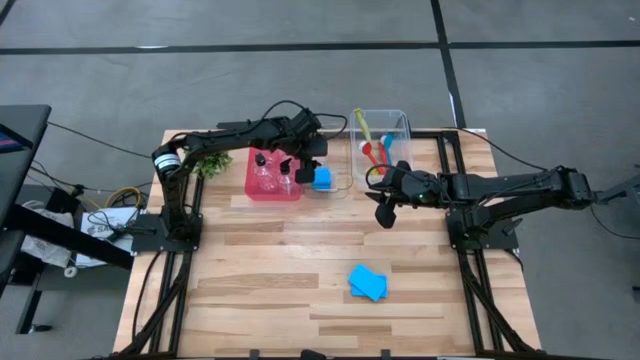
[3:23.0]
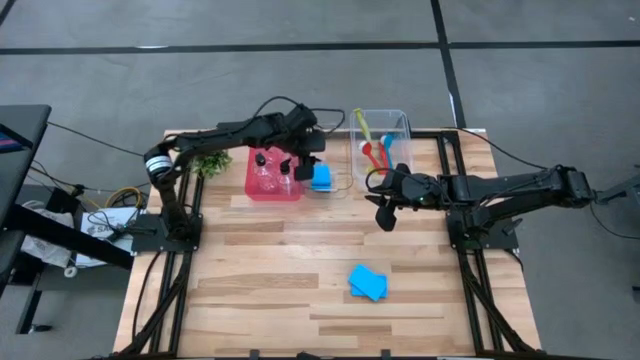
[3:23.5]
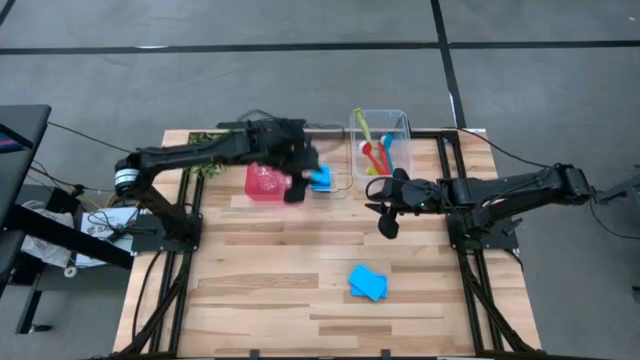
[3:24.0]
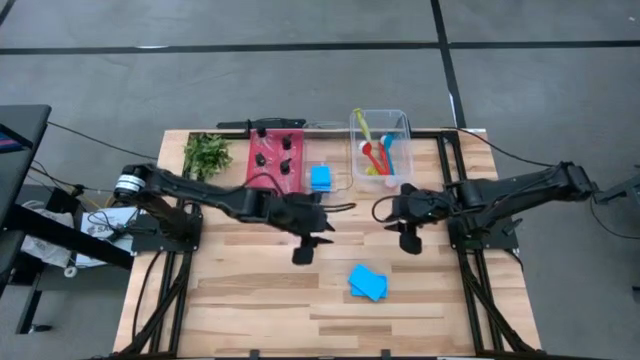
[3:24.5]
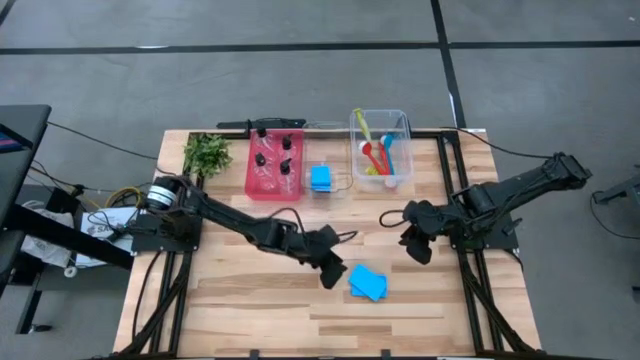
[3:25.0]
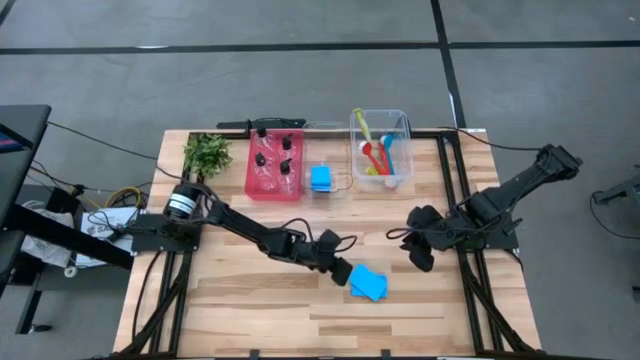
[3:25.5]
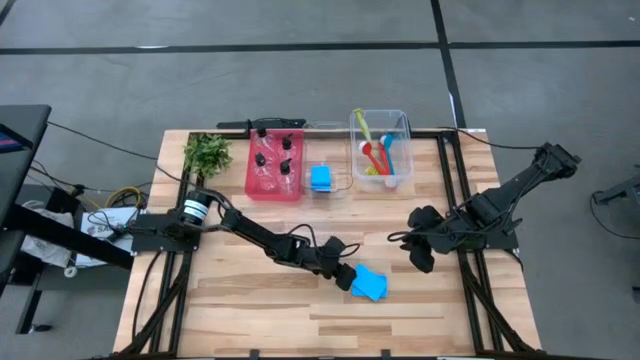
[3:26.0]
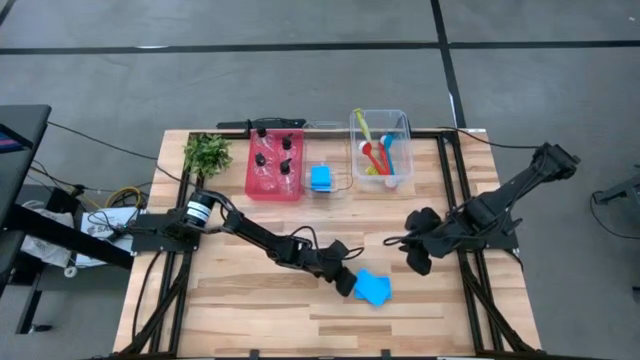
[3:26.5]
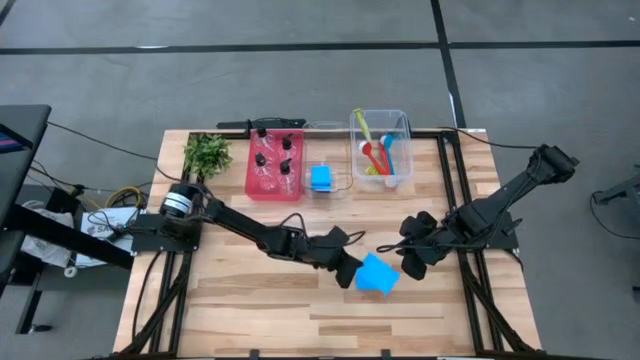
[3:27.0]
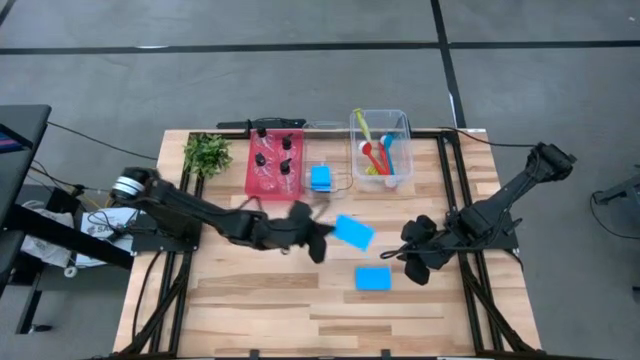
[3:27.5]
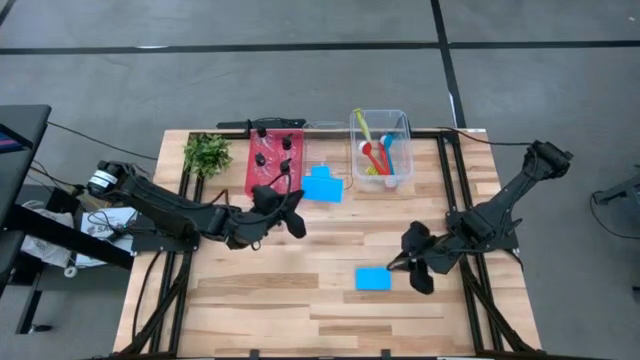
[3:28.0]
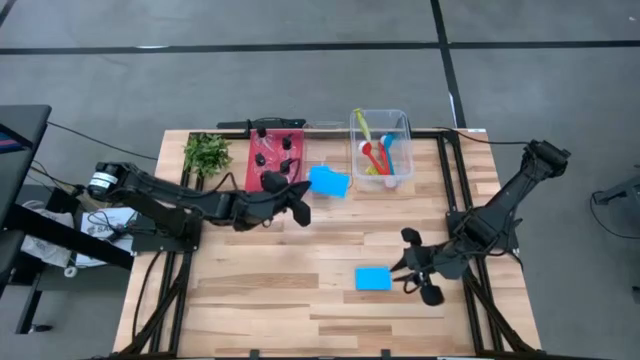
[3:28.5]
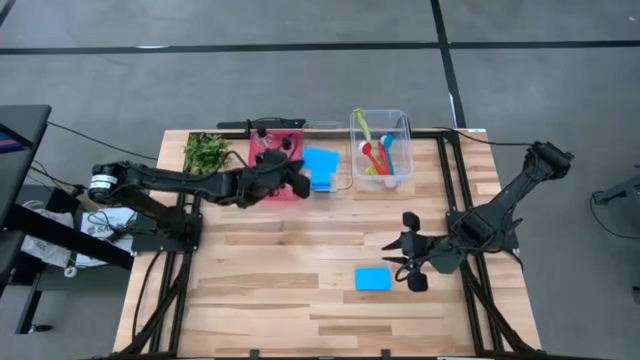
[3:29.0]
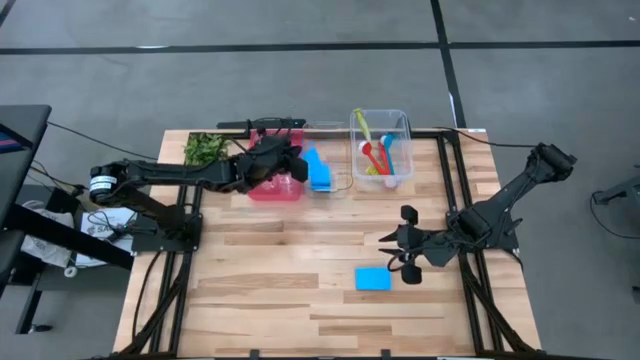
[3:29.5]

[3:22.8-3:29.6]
Task: Pick & Place Kitchen Sink Supplies
Put the blue sponge into the transparent bin

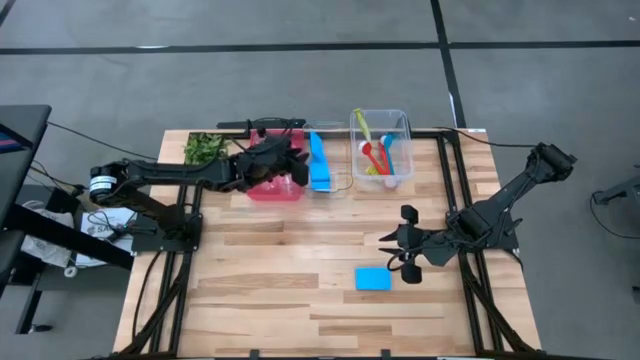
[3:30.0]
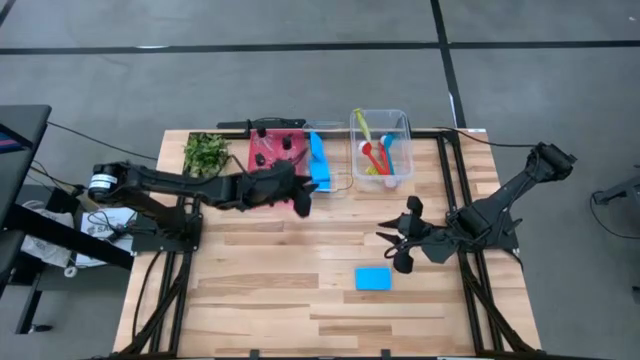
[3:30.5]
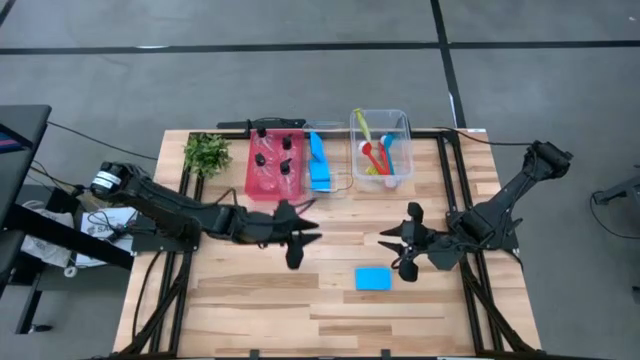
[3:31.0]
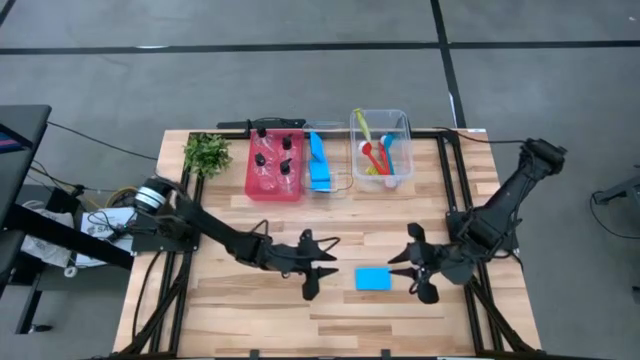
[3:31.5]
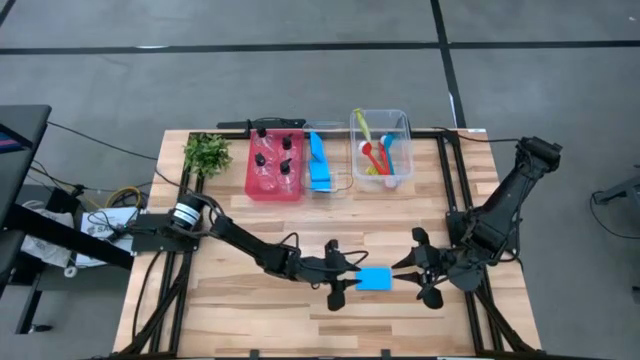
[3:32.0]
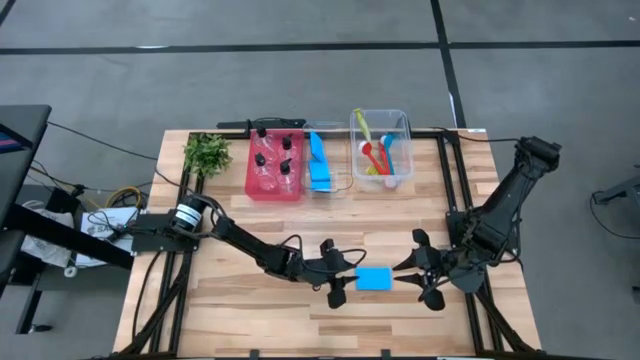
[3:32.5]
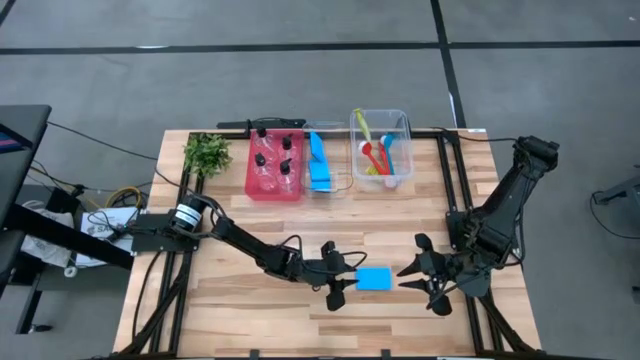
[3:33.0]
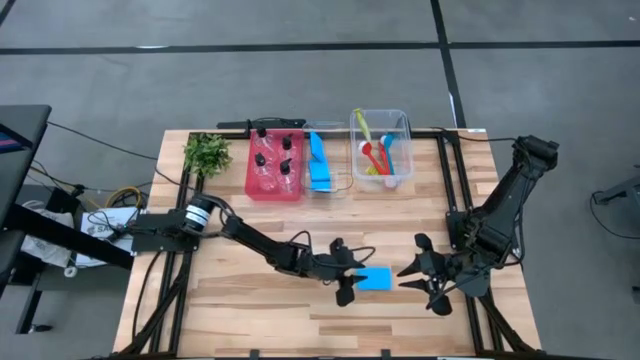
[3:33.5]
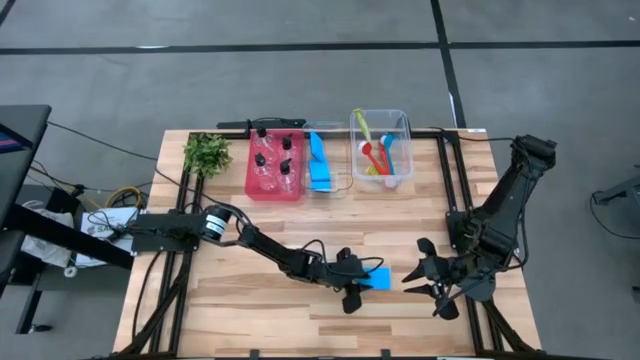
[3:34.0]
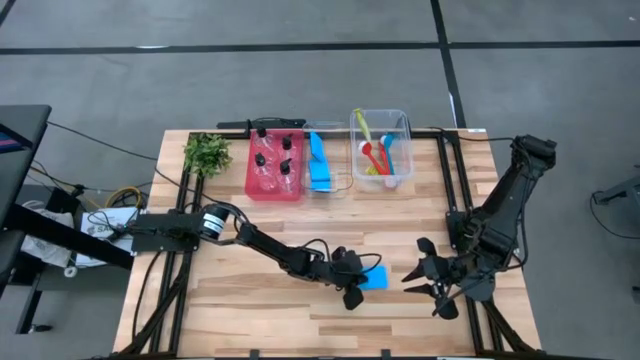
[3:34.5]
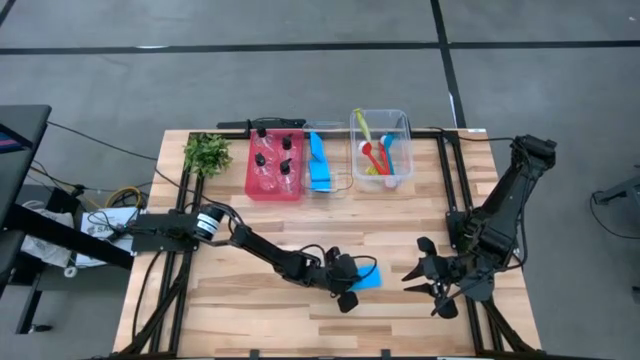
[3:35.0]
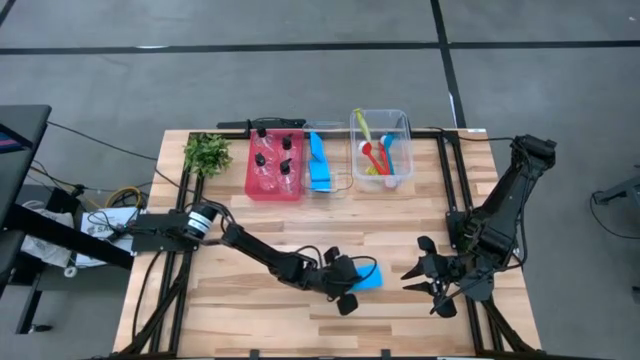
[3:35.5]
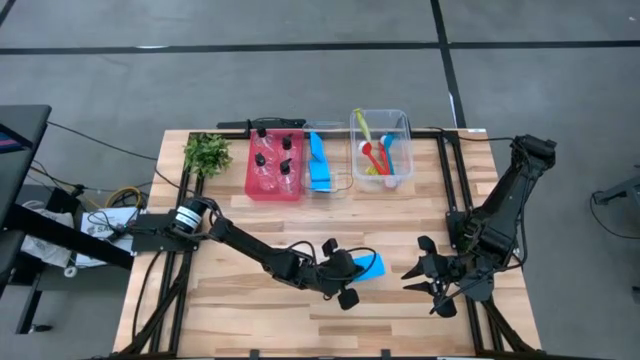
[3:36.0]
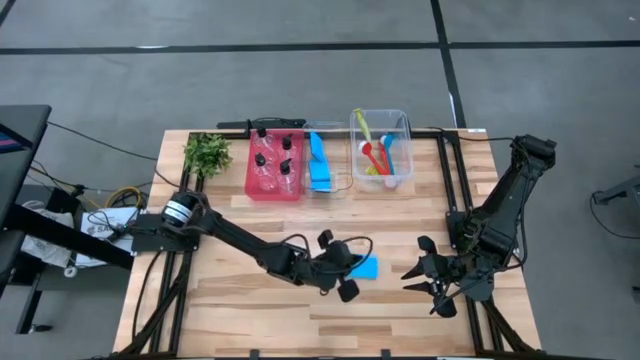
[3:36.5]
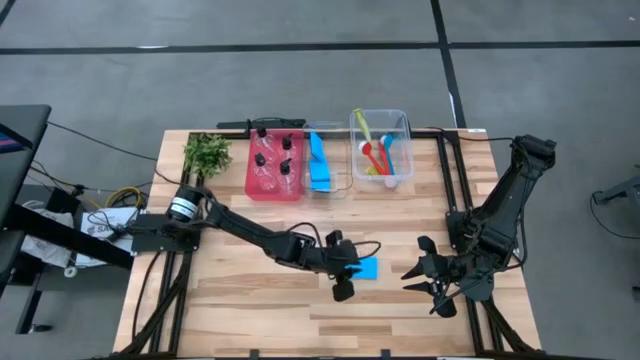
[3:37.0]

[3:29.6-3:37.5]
Put the blue sponge into the transparent bin

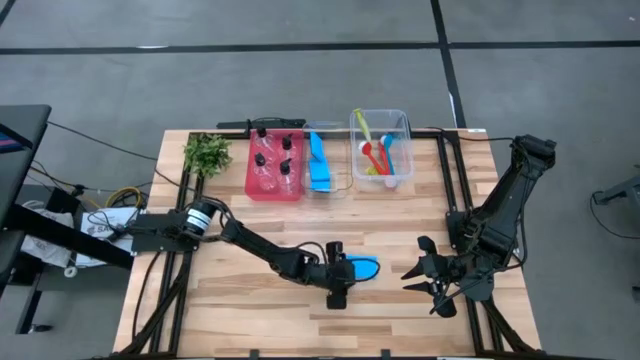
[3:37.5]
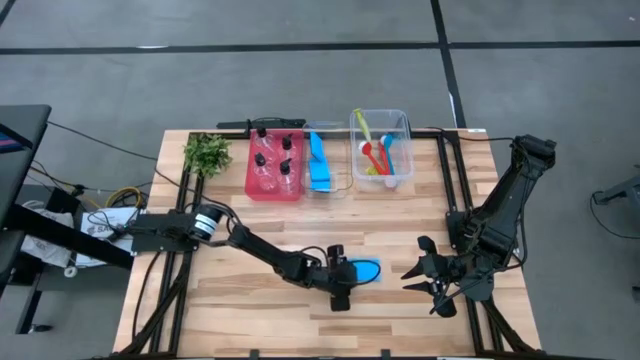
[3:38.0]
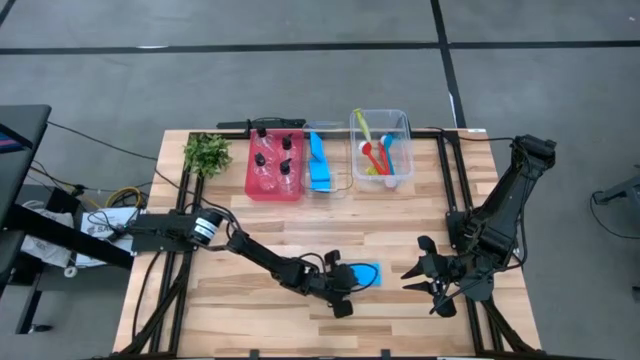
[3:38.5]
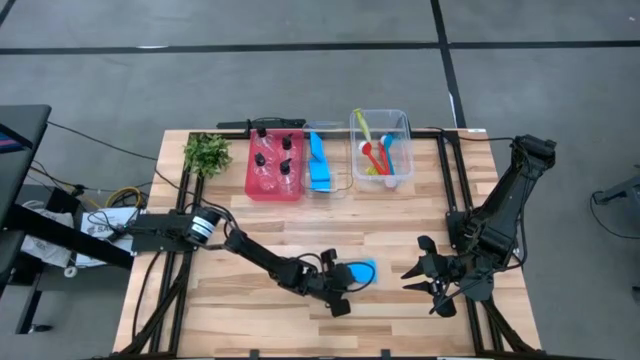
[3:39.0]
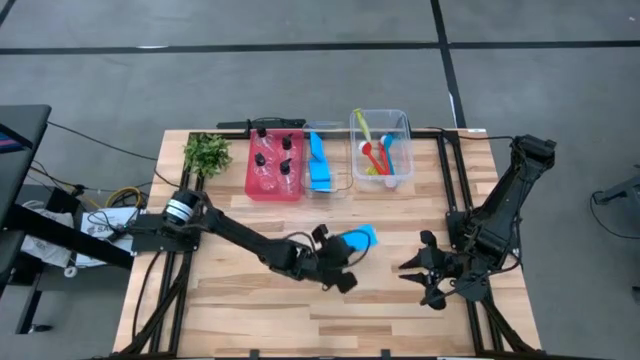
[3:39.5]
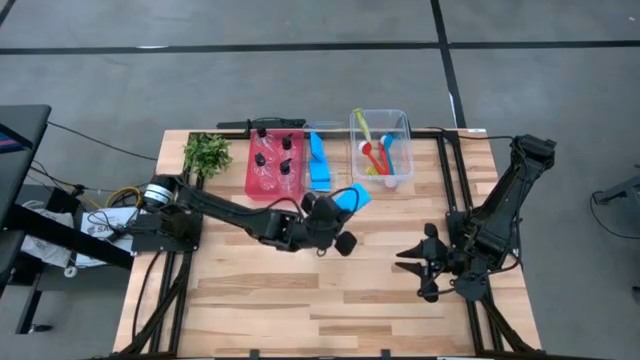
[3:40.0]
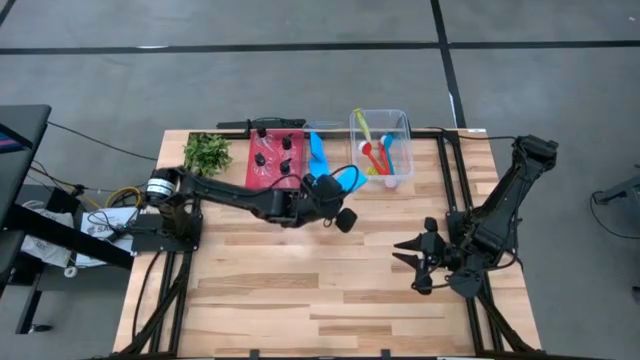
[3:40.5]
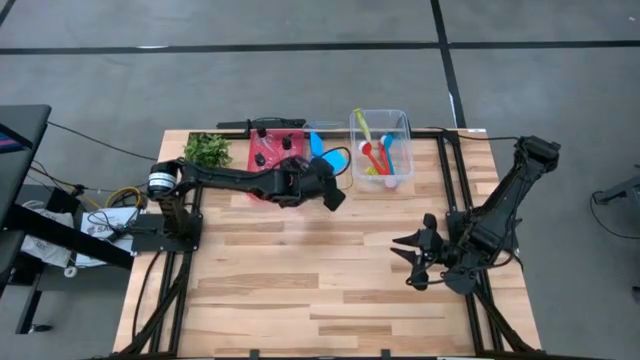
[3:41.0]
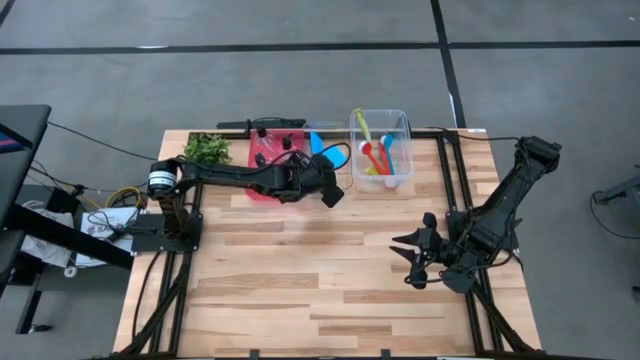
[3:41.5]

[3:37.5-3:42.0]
Put the blue sponge into the transparent bin

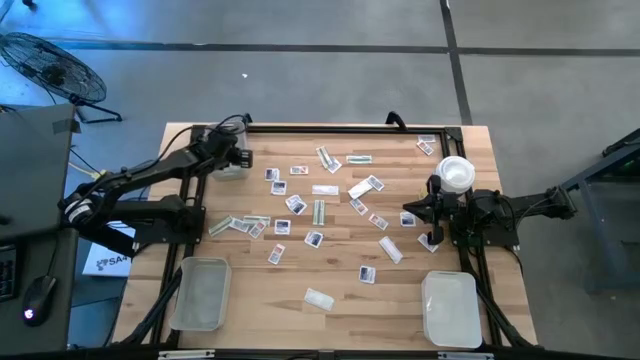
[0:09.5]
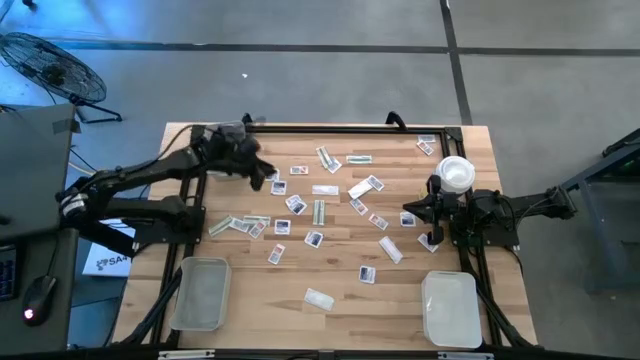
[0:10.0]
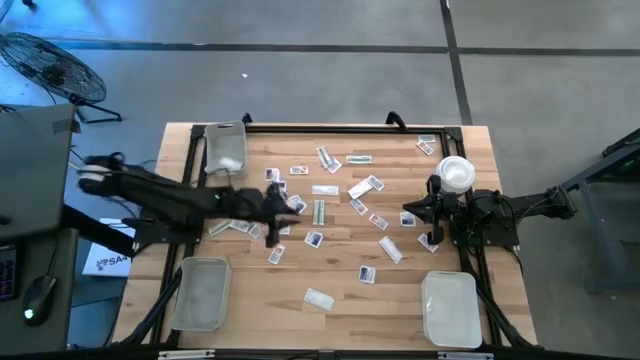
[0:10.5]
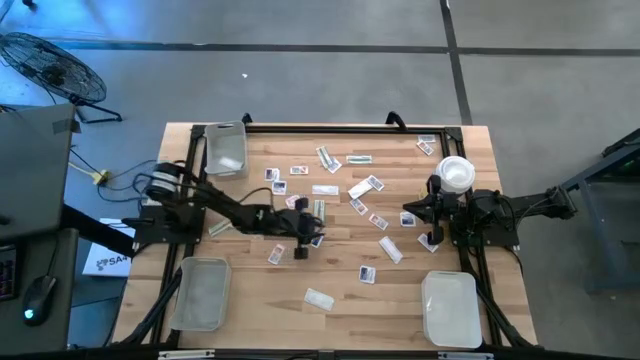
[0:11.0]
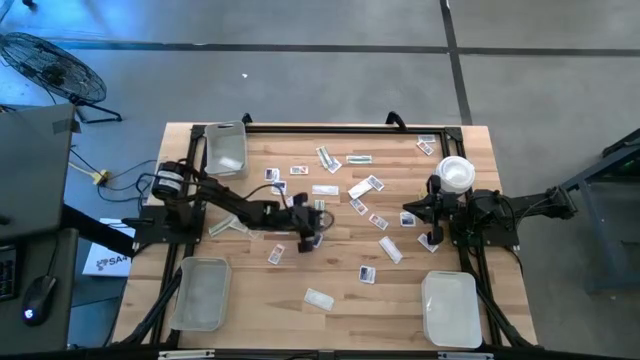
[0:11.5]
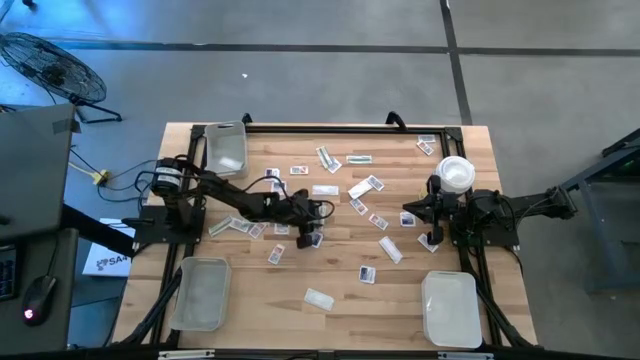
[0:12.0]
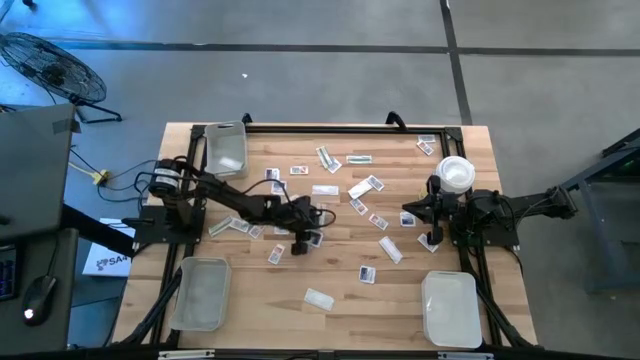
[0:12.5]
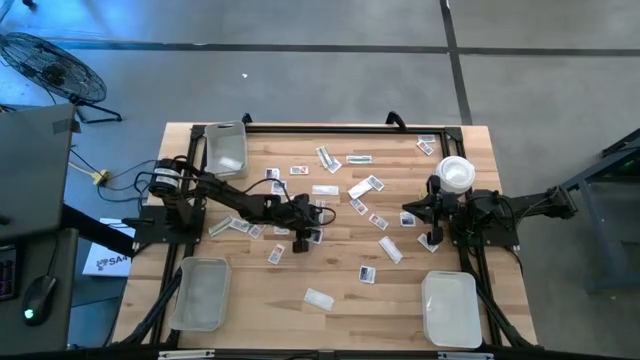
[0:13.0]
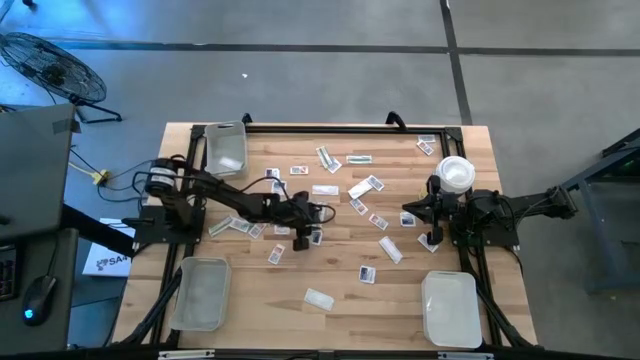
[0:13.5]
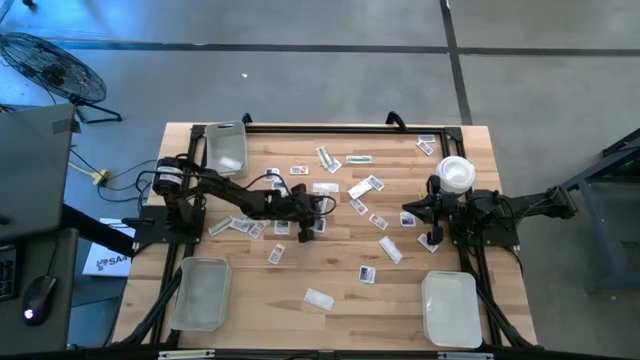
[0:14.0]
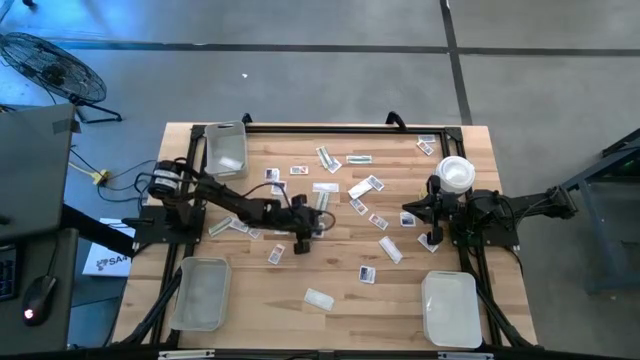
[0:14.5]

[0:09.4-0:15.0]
Task: Pick & Place First Aid Supplies
Adjust the green bandage pack and blue alcohol pad on the table
